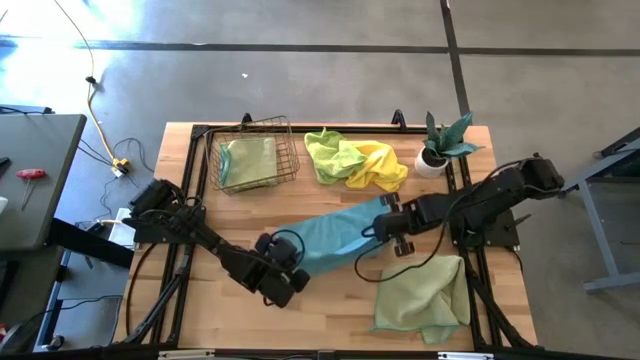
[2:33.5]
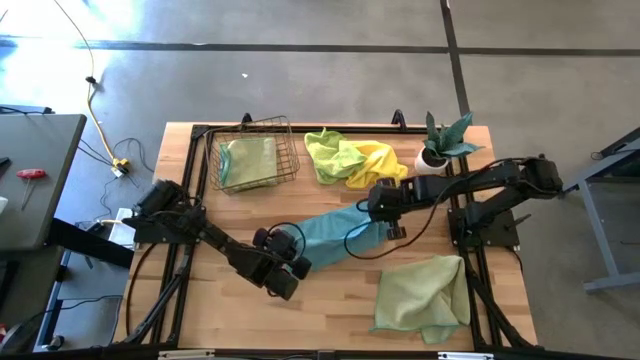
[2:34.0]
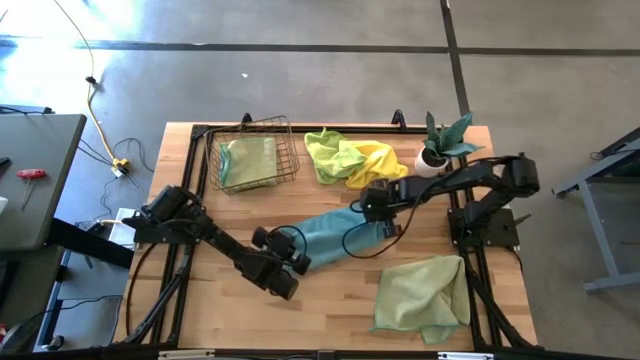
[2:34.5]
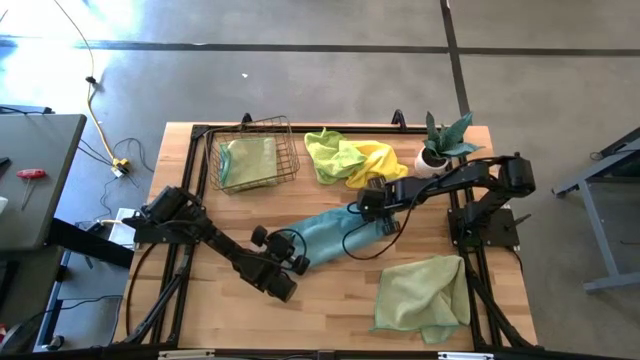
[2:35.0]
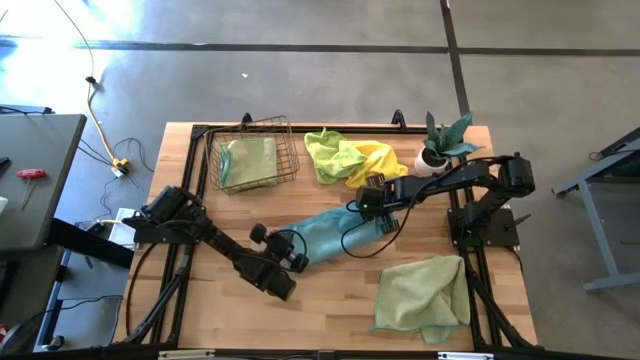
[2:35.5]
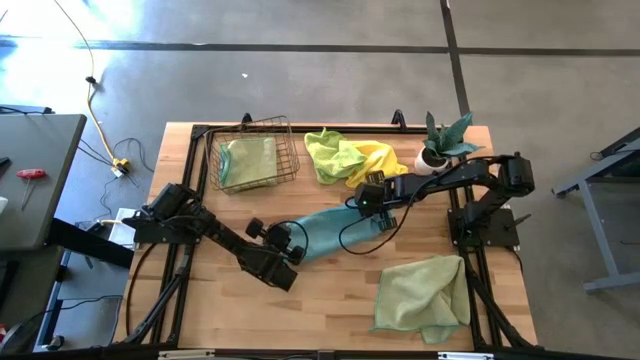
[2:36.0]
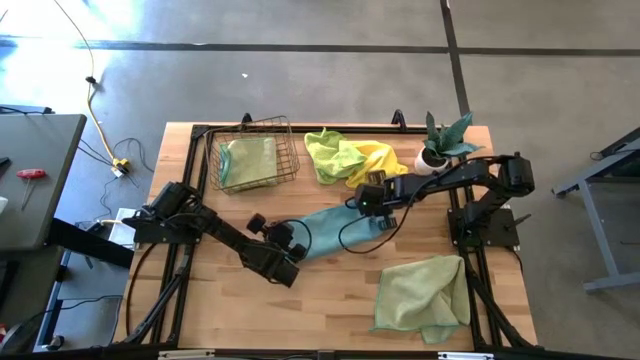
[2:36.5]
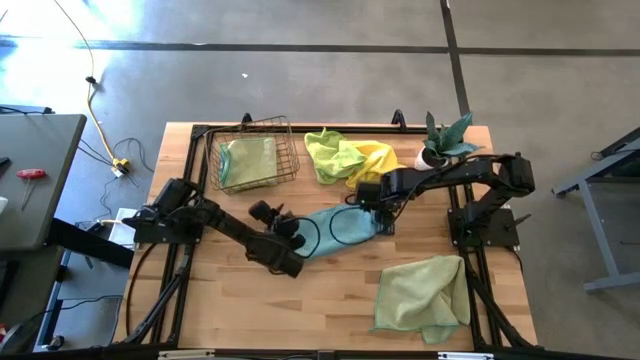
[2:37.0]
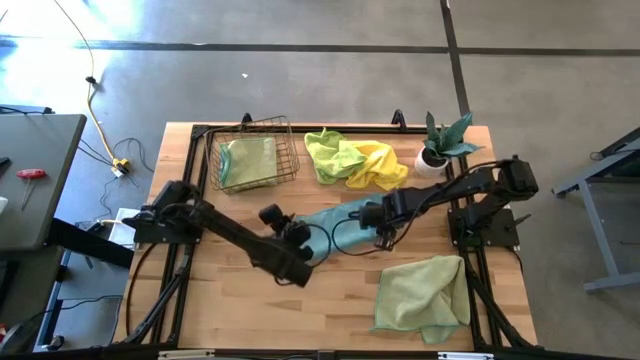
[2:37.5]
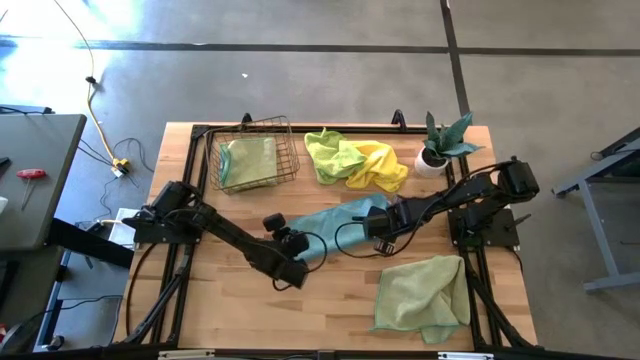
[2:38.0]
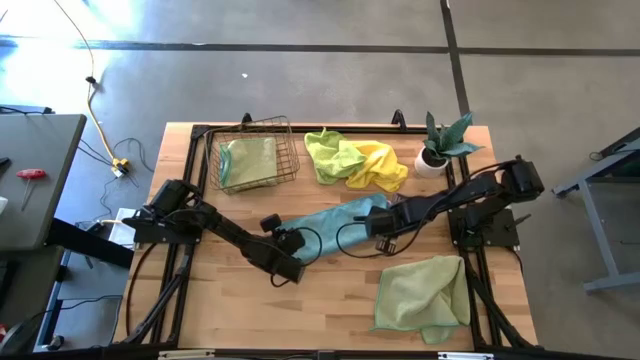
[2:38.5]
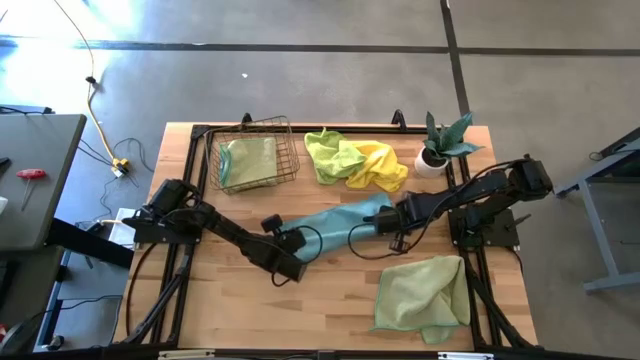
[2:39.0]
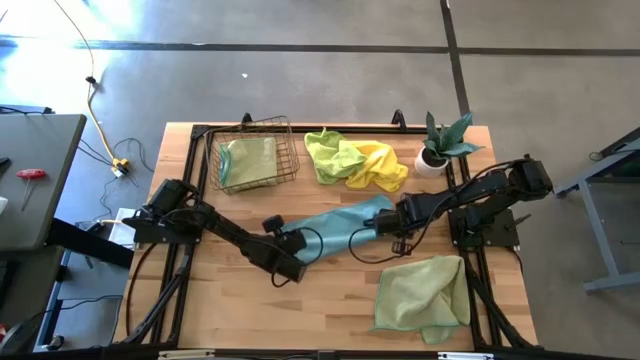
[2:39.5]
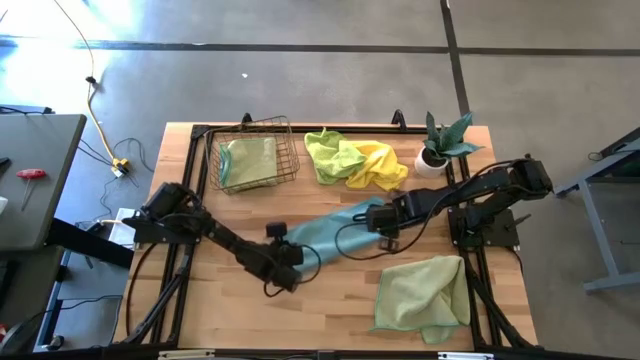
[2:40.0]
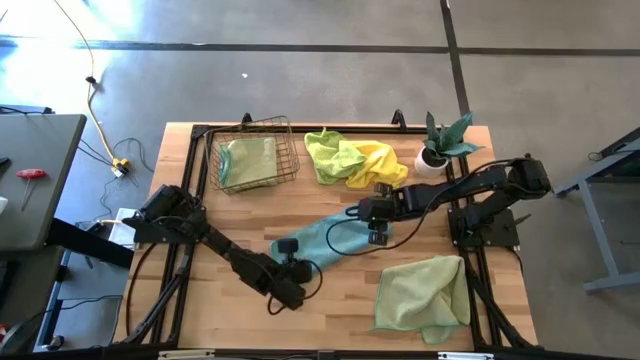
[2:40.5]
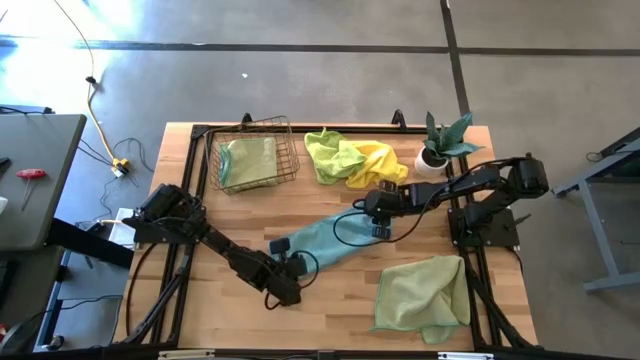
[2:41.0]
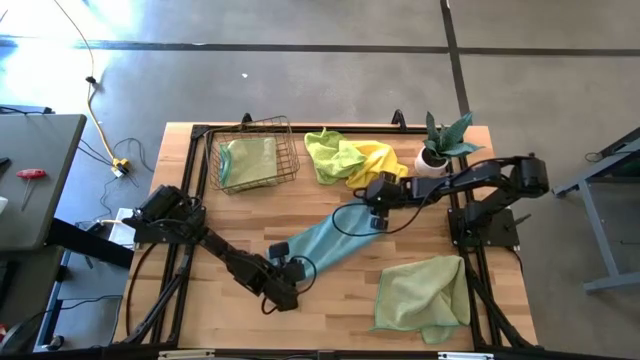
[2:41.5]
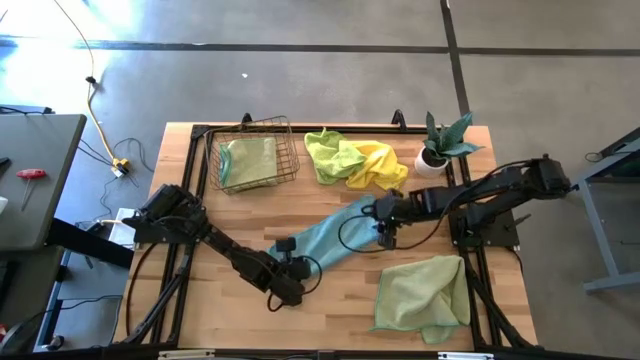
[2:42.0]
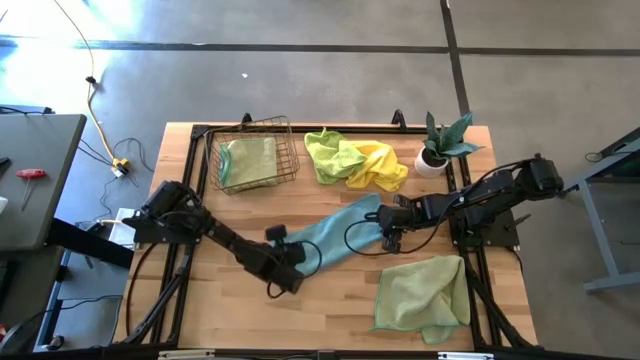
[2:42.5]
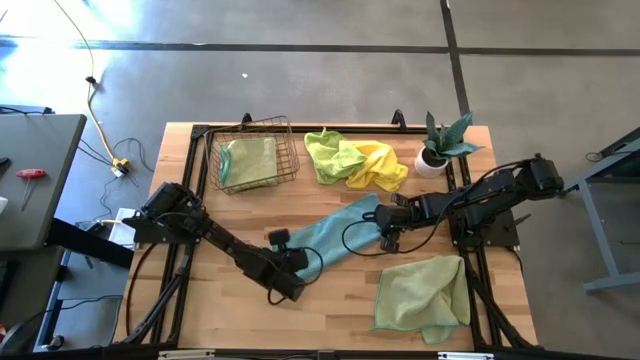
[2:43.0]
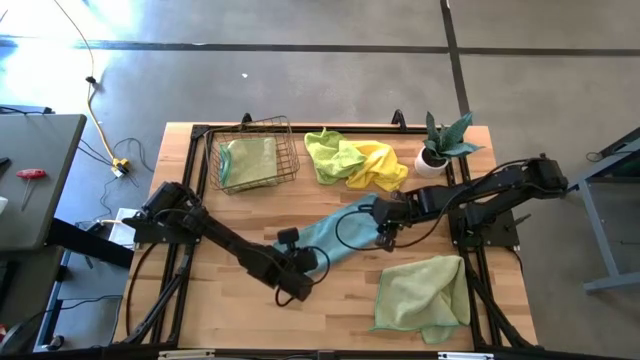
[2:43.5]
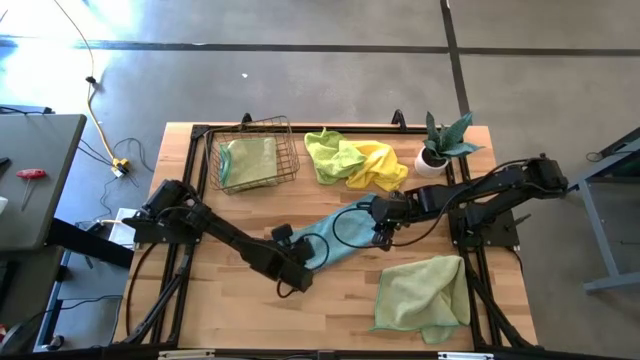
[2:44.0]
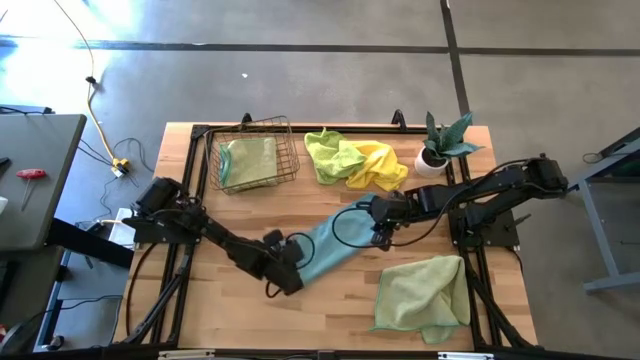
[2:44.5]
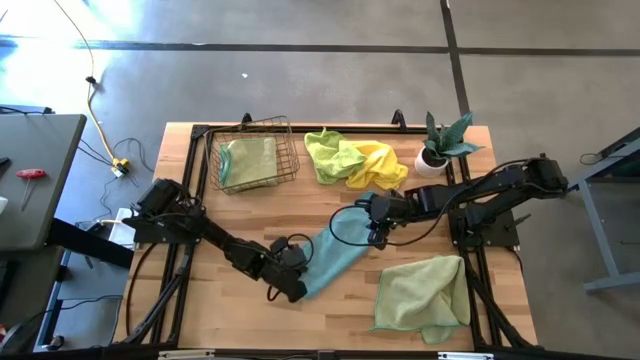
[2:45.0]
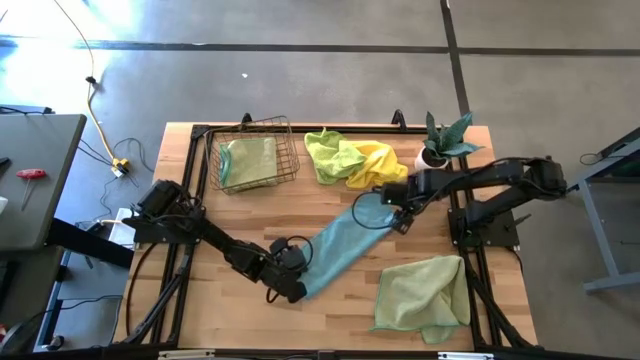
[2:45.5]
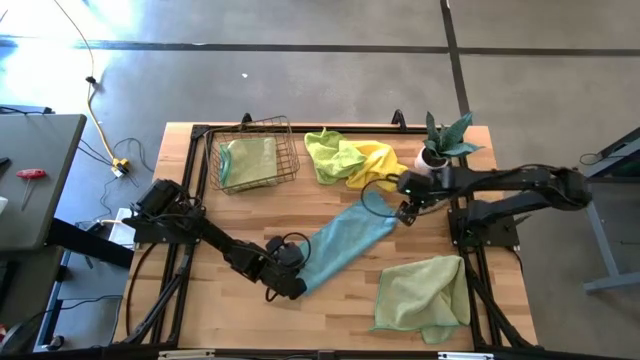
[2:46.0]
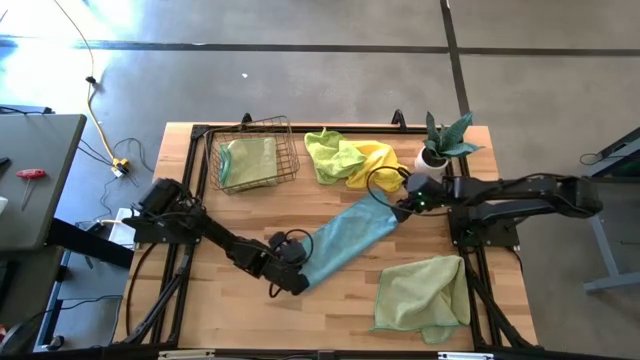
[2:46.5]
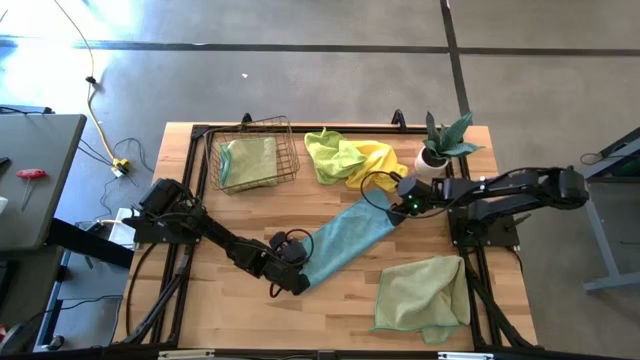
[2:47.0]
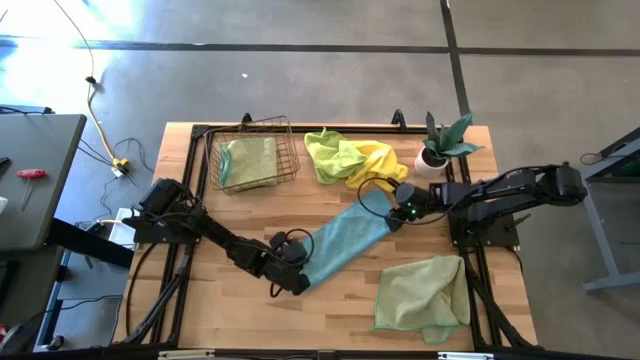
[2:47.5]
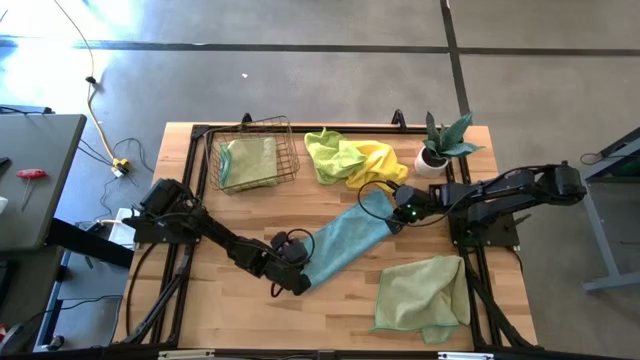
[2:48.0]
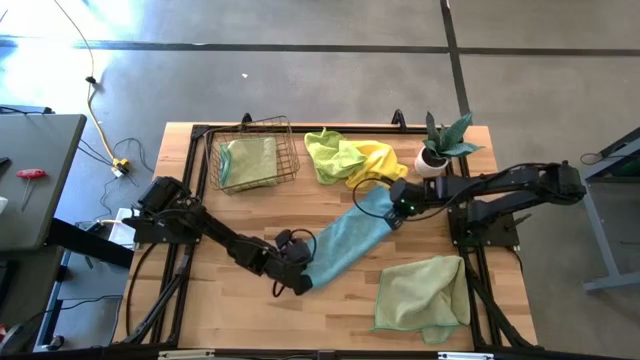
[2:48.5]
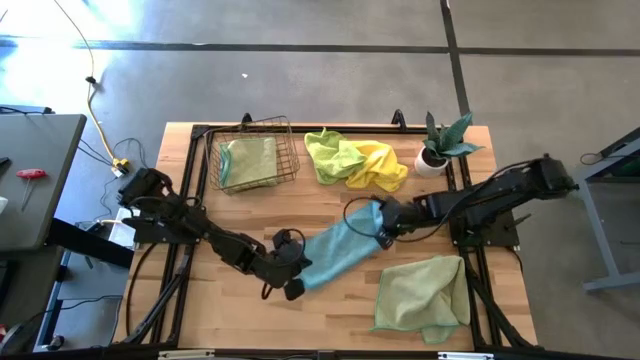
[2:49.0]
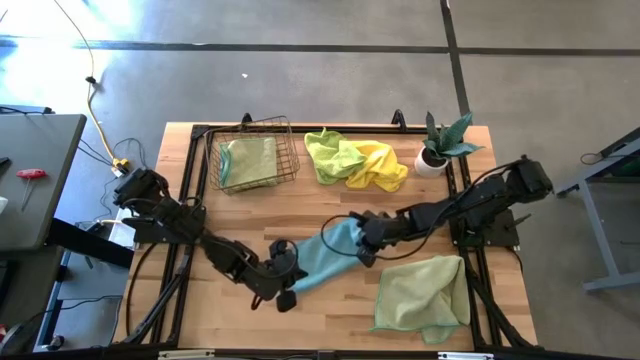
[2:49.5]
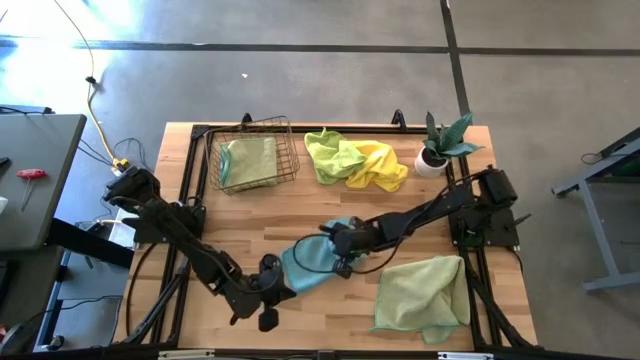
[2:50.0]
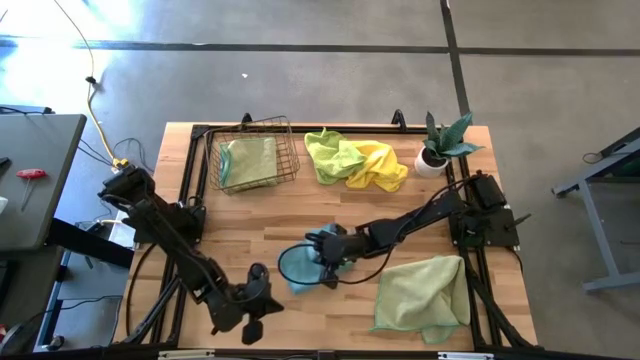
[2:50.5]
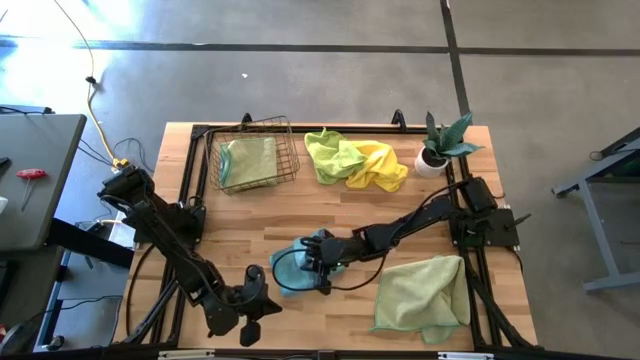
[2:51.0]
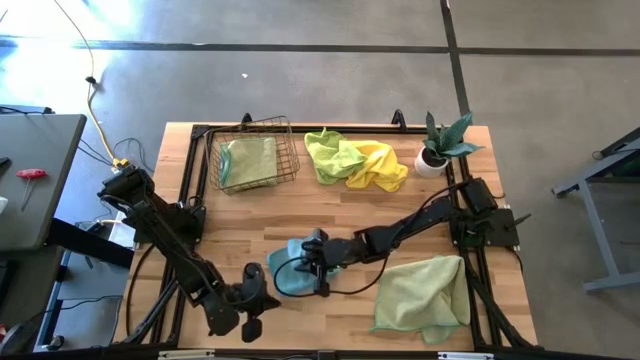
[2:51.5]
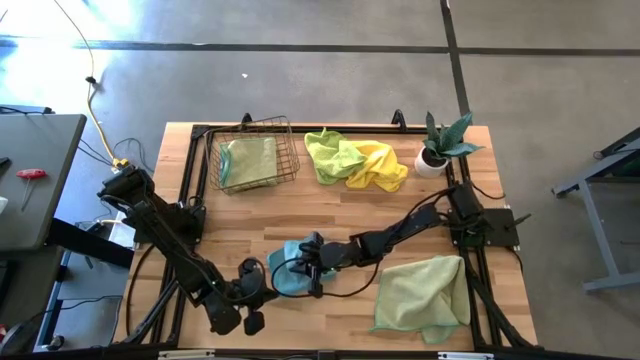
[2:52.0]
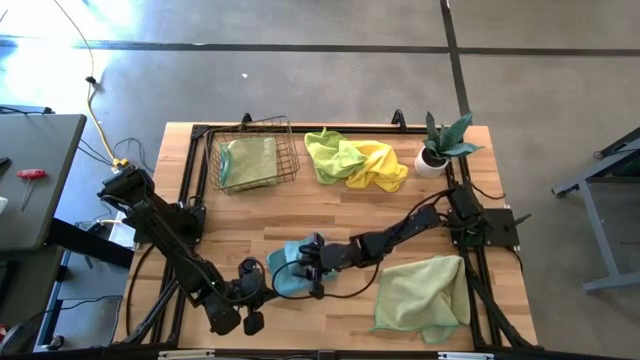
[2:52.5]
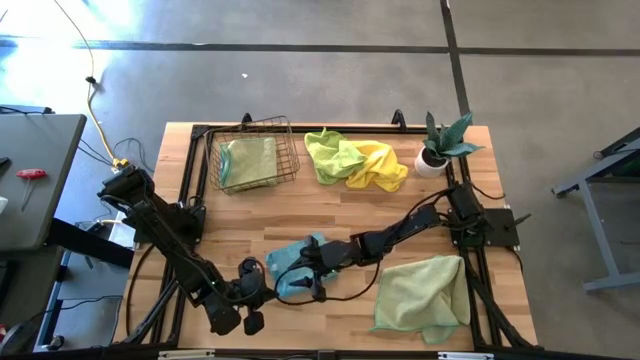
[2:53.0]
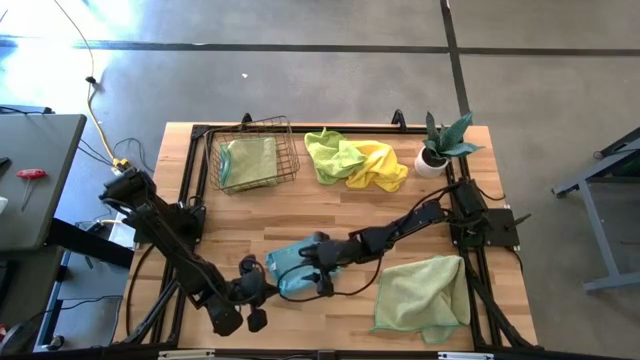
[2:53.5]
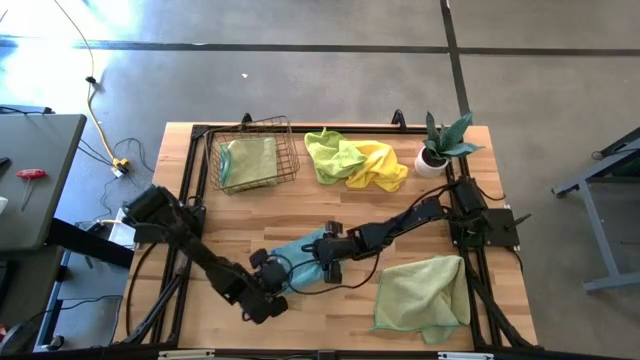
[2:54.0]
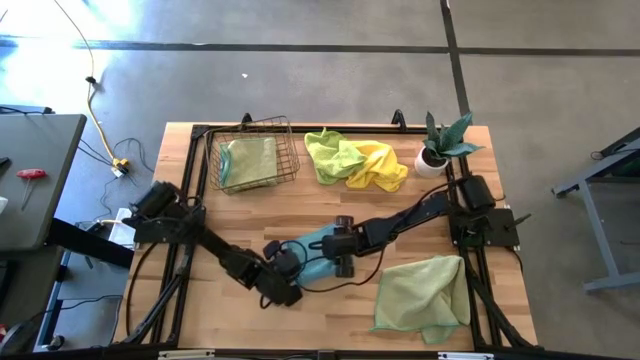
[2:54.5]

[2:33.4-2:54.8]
Task: Fold microfiber towels
Fold the blue towel
